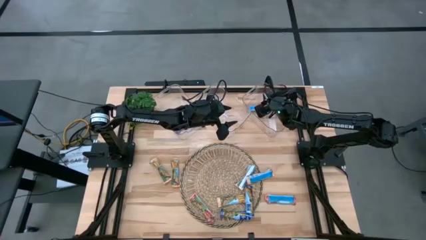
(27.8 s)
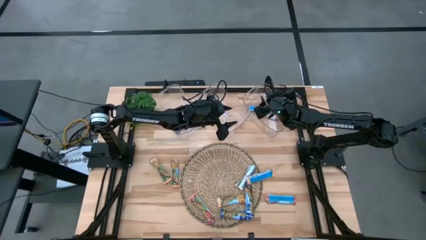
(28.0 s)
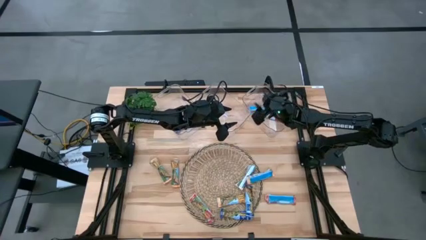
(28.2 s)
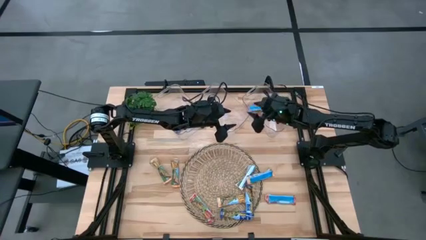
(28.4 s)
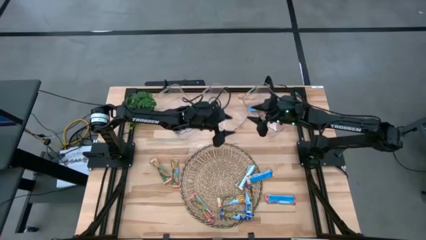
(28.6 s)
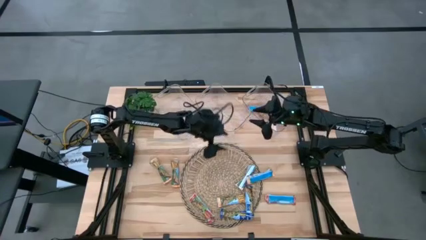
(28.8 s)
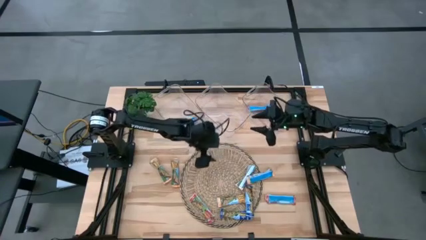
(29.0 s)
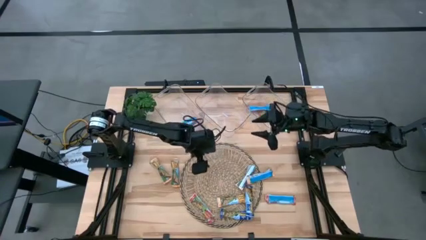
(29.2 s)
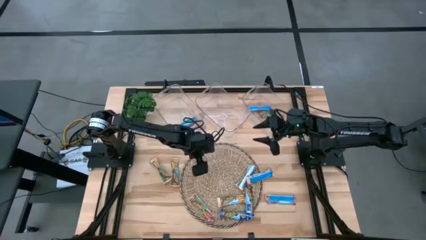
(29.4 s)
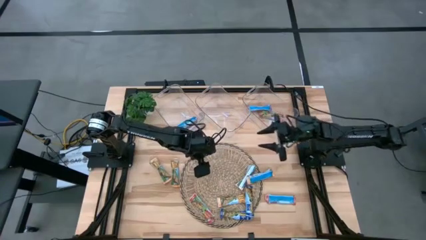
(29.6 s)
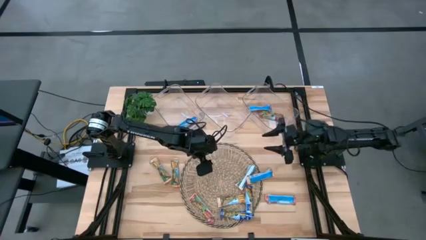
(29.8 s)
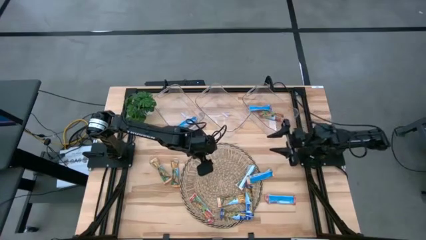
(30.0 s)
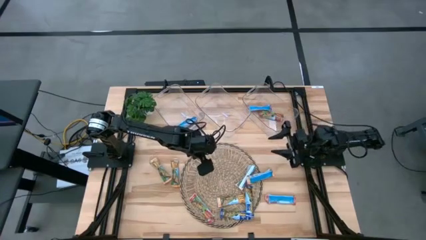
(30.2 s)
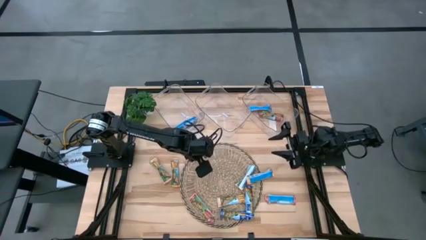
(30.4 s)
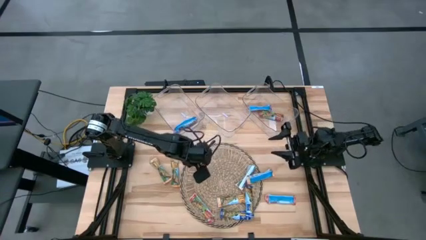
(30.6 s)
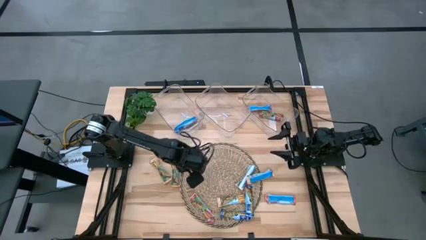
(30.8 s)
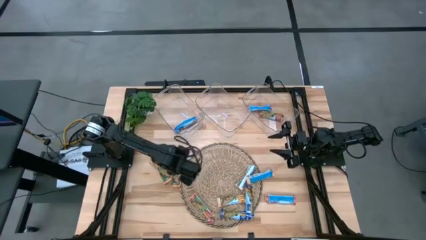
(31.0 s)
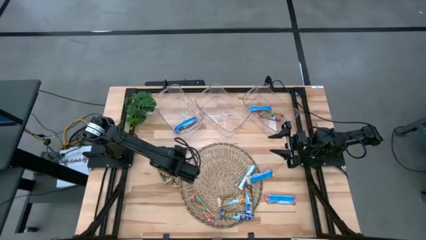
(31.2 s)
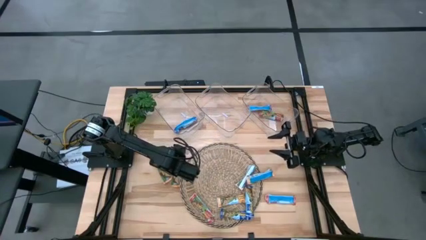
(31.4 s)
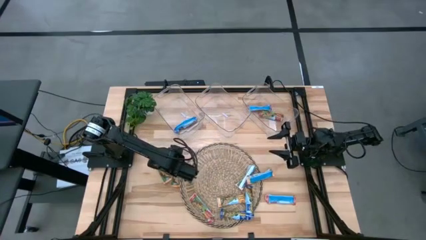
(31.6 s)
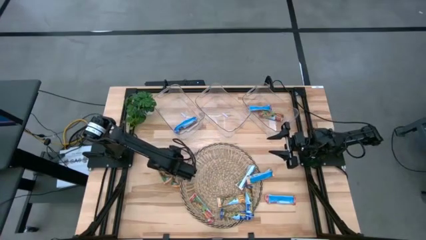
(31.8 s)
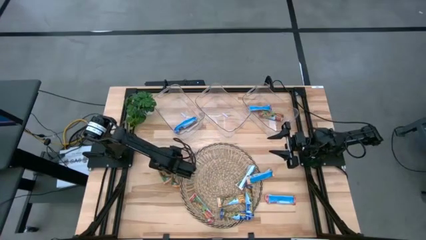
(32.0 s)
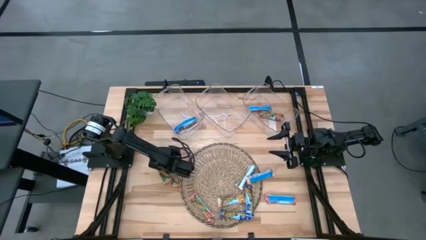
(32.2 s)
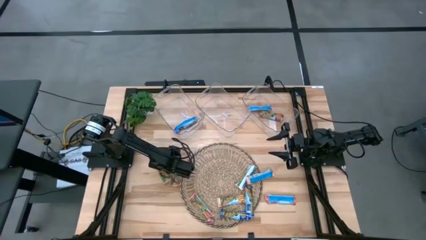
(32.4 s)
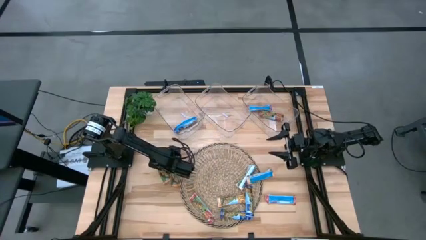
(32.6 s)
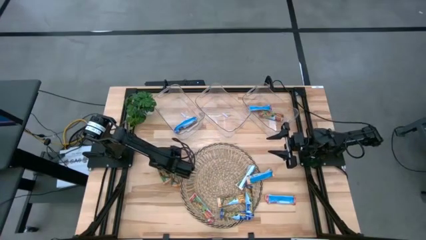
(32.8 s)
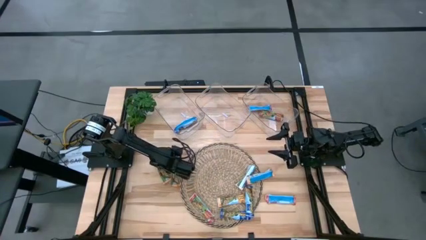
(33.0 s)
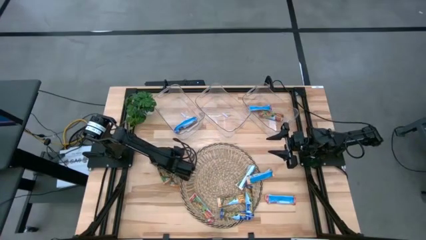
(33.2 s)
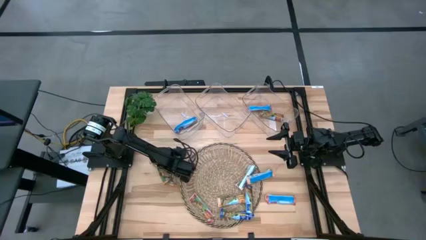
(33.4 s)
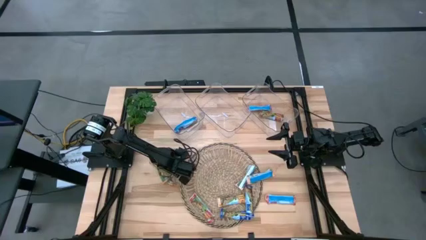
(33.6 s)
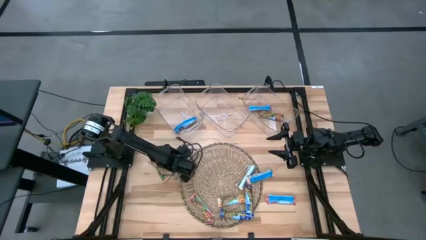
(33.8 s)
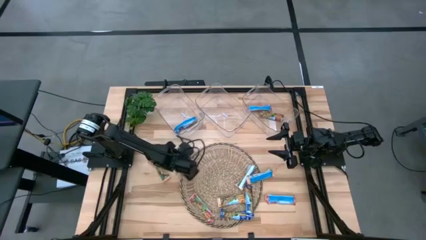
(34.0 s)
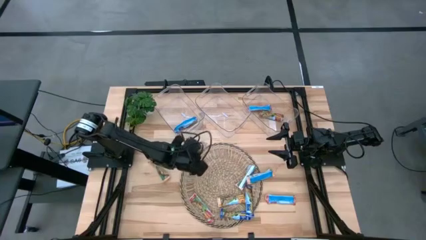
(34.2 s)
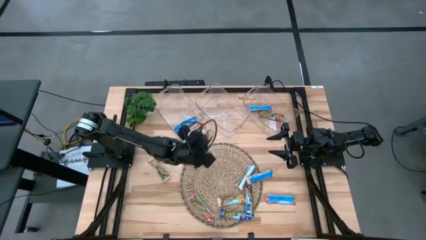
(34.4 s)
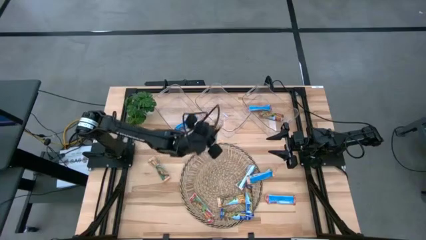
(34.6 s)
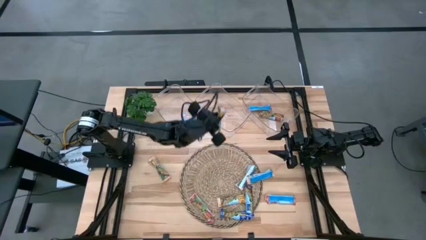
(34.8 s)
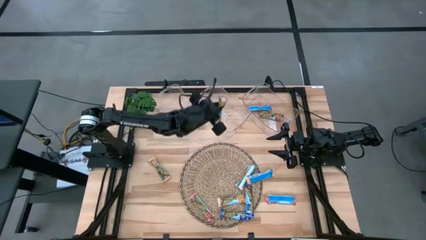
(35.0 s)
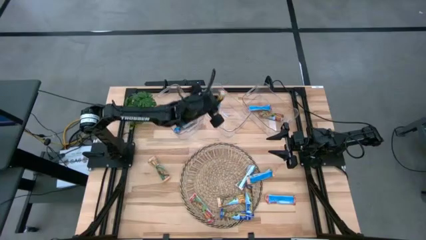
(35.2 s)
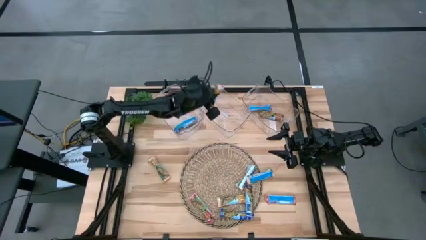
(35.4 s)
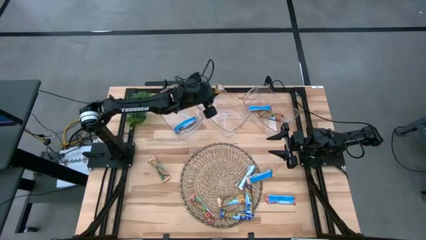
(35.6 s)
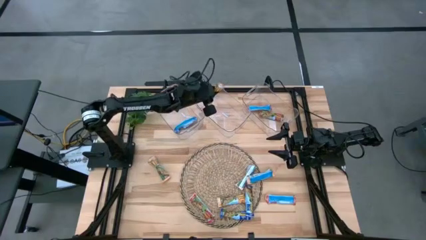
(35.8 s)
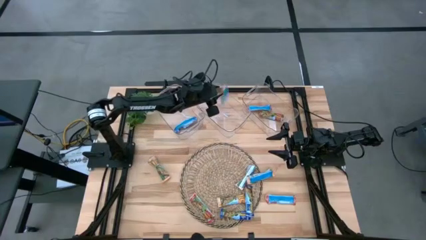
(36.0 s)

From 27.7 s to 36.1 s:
Task: Pick and place Granola Bars by type
Put the yellow granola bar into the middle transparent bin

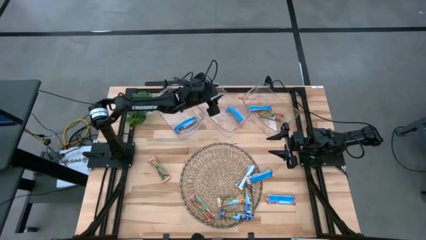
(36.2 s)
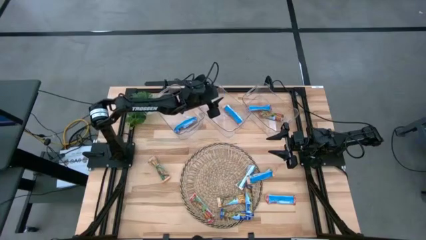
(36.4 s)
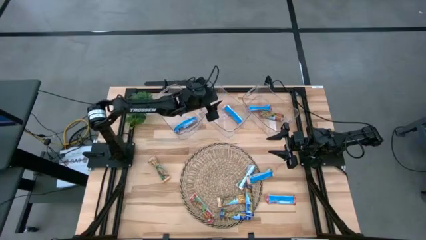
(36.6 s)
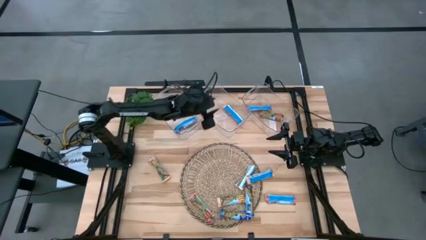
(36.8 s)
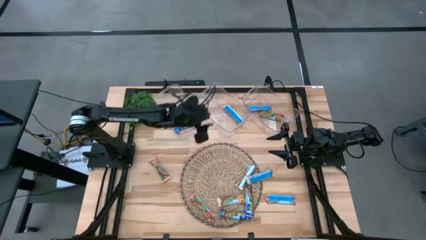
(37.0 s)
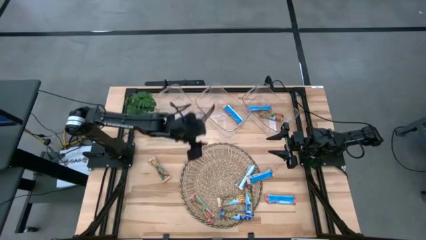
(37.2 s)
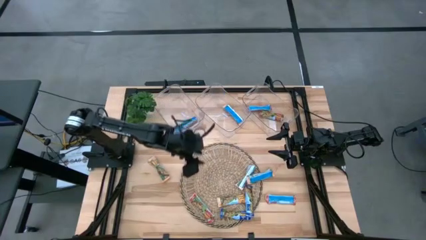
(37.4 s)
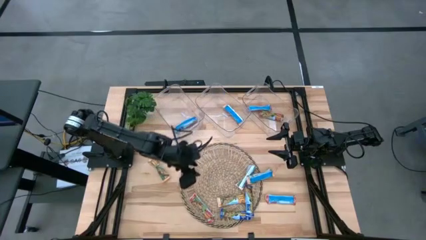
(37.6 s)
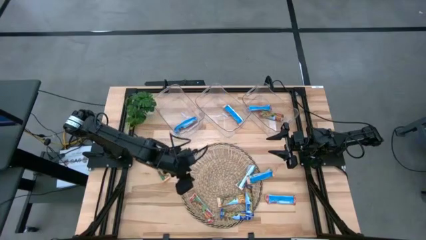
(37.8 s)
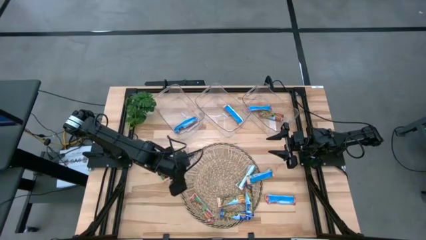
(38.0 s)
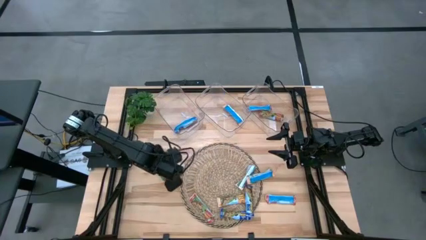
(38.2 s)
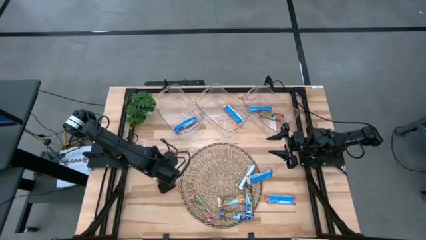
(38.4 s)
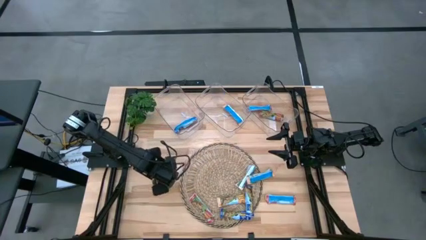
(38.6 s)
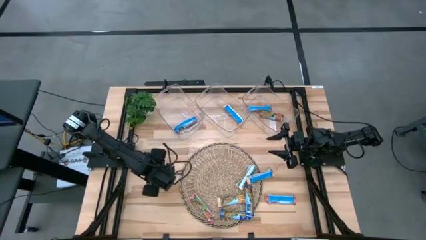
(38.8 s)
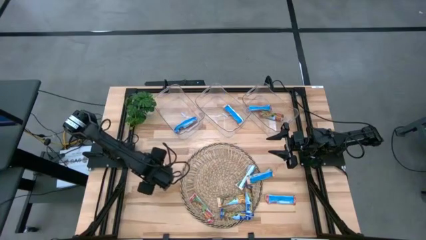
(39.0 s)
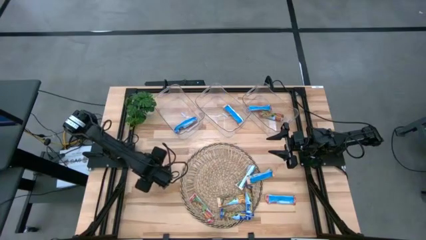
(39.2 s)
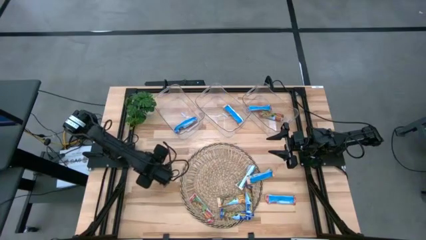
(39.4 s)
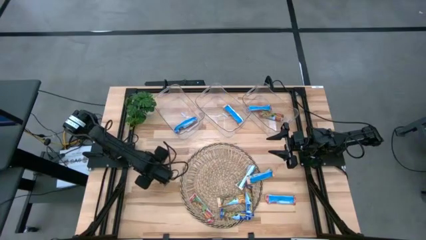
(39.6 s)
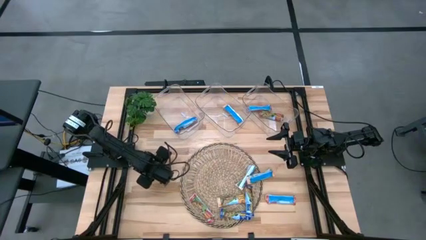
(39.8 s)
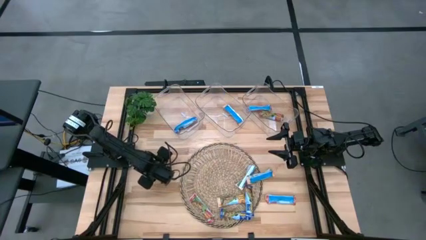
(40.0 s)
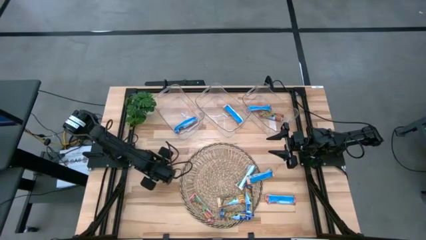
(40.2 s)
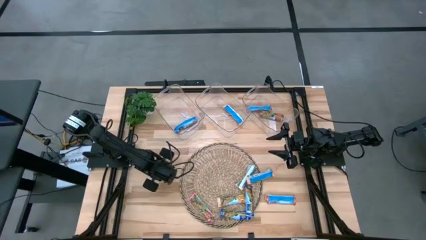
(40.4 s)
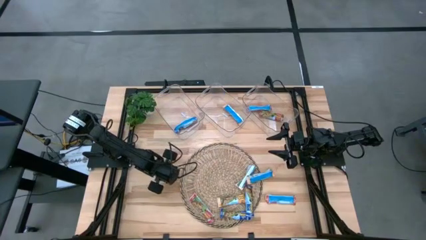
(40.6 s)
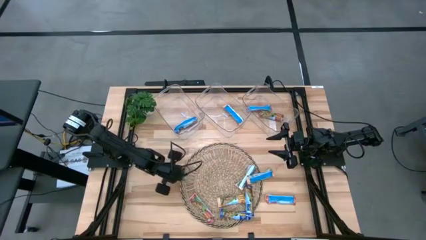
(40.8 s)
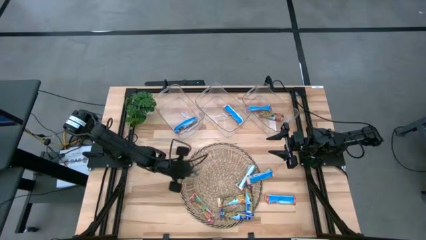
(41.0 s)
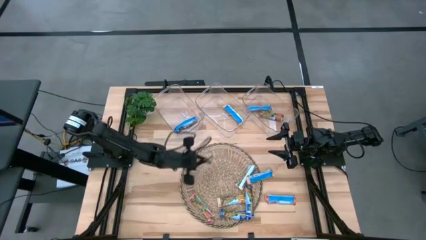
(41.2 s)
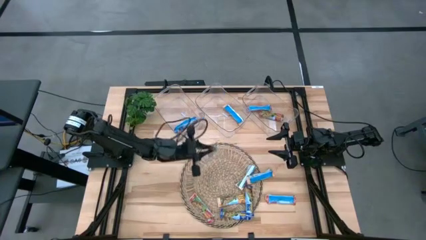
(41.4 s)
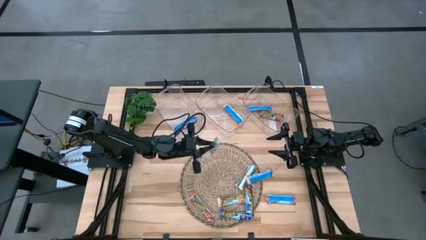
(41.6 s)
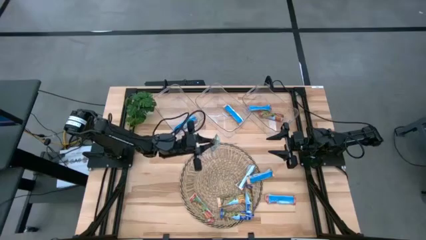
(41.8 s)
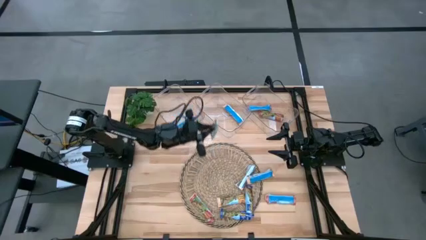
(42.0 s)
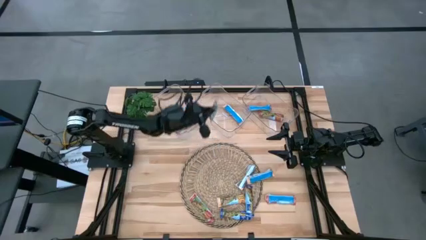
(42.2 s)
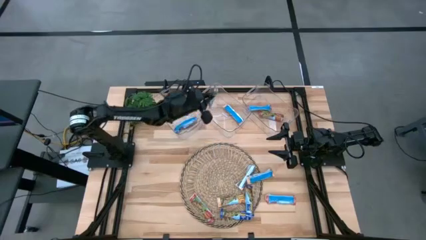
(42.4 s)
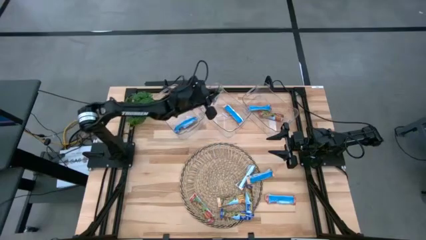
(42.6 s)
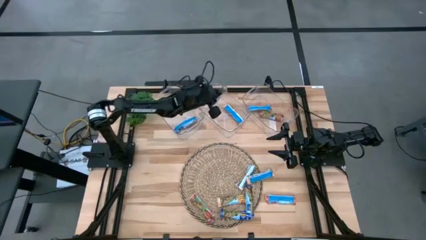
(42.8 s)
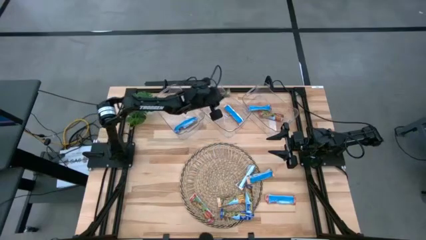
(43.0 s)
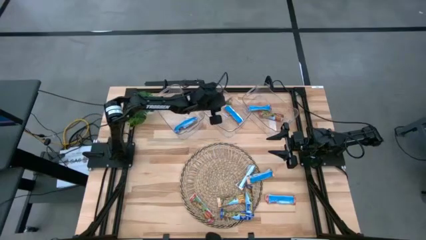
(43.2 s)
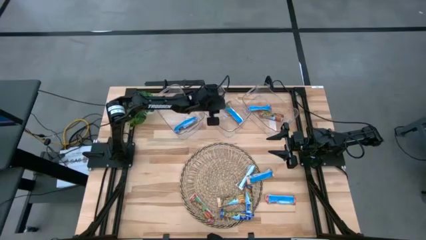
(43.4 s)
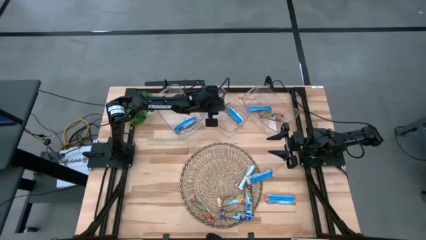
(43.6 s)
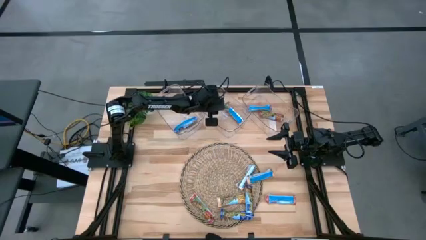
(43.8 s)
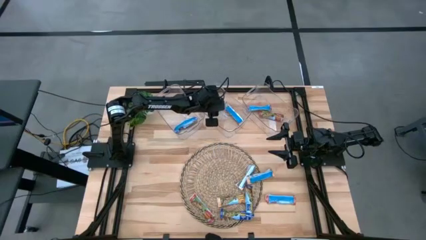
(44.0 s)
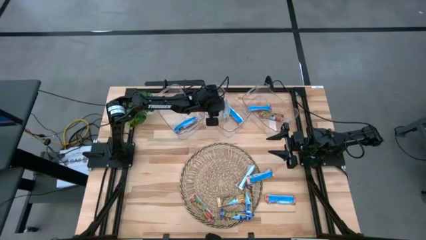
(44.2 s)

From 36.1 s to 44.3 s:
Put the yellow granola bar into the middle transparent bin

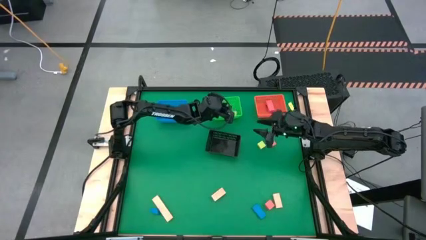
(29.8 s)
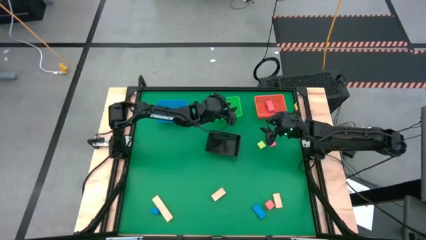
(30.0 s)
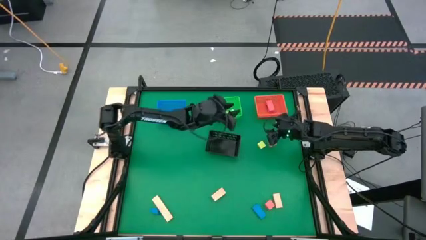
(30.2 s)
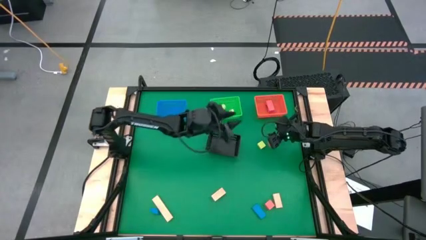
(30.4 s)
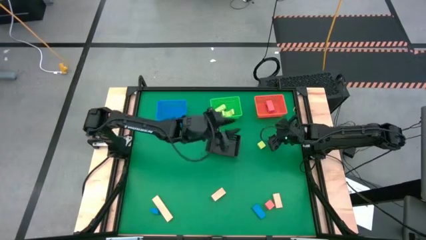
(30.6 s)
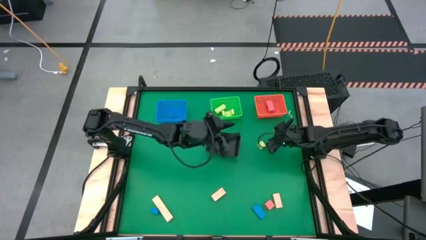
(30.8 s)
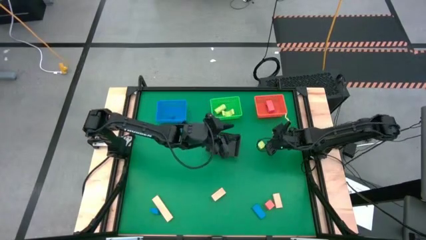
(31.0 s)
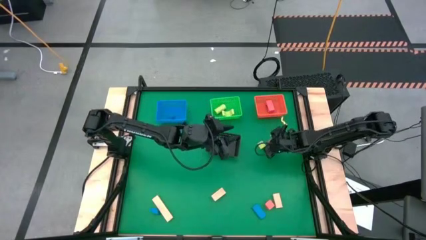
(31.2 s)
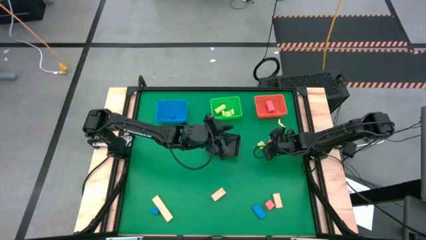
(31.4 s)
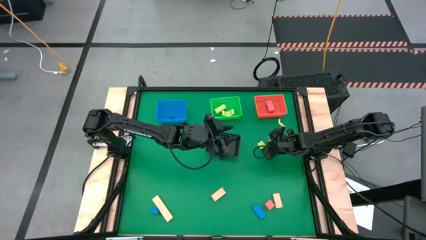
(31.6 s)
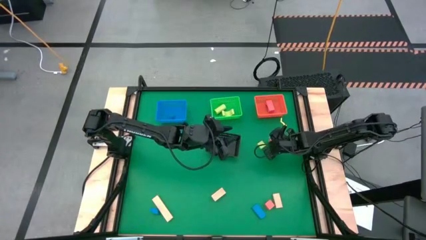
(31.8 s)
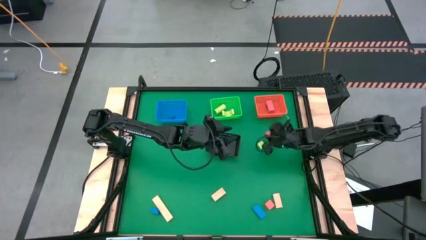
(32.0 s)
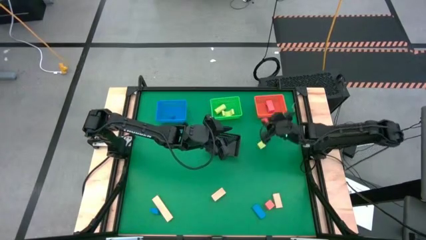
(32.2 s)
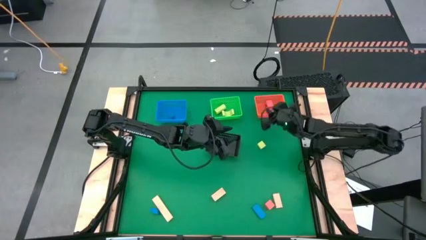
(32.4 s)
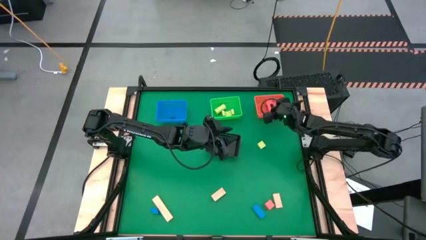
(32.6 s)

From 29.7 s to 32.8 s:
Task: Sort & place blocks by color
Put the top orange block into the orange bin
